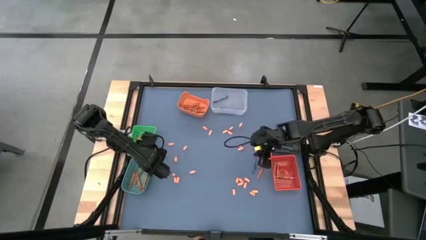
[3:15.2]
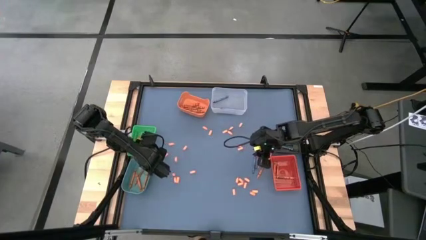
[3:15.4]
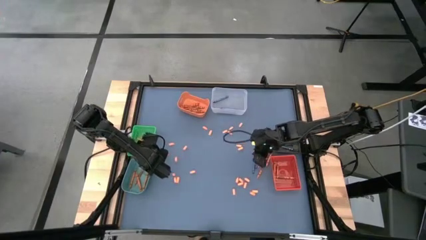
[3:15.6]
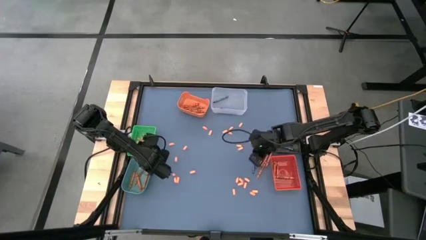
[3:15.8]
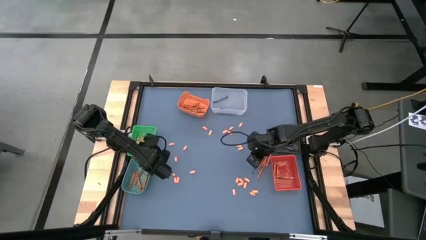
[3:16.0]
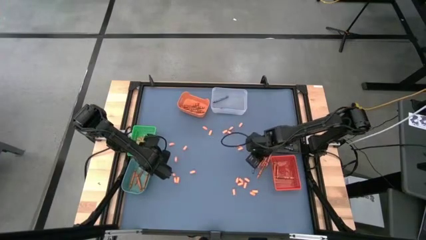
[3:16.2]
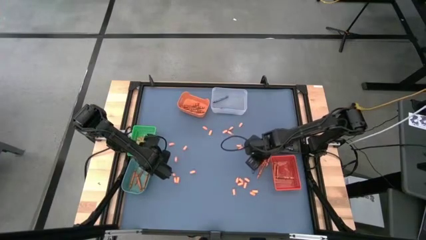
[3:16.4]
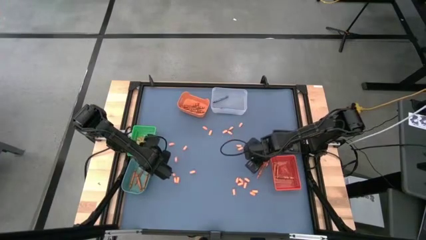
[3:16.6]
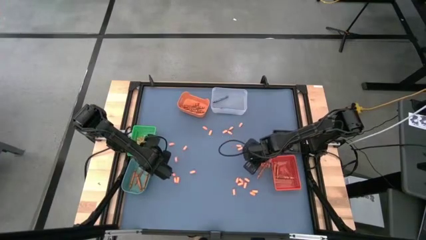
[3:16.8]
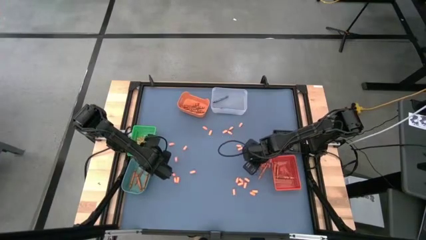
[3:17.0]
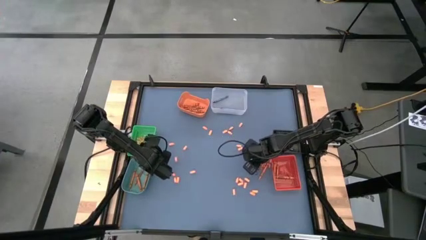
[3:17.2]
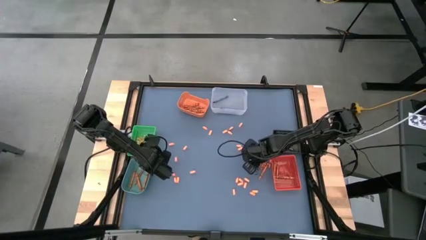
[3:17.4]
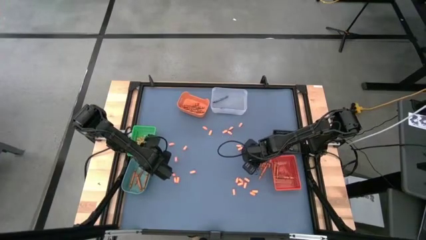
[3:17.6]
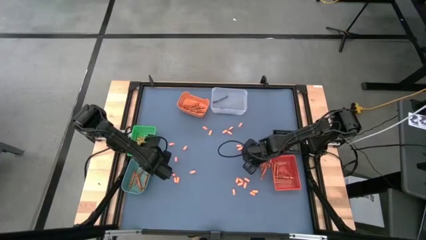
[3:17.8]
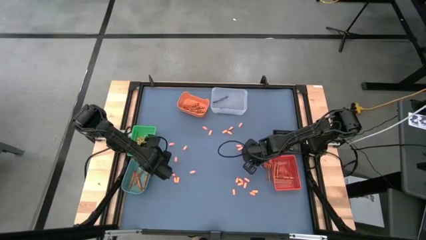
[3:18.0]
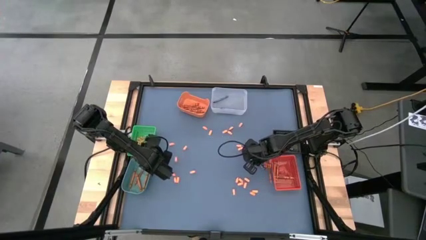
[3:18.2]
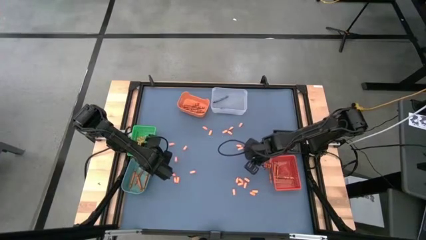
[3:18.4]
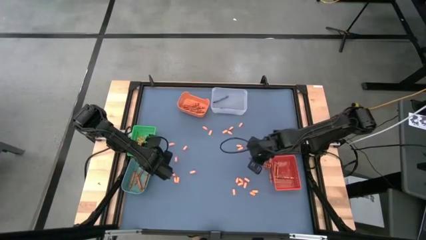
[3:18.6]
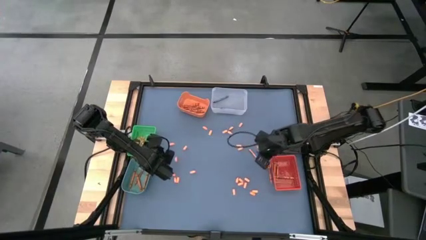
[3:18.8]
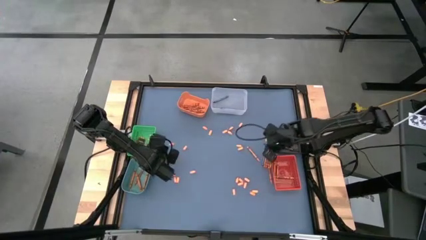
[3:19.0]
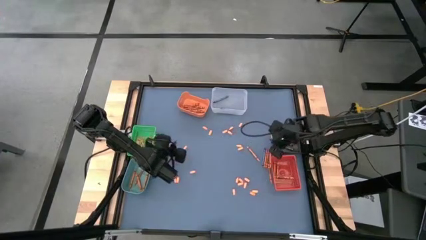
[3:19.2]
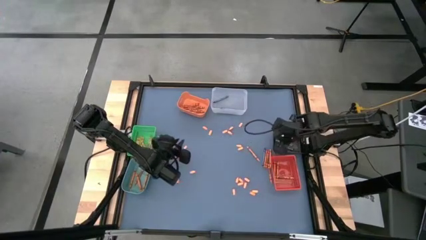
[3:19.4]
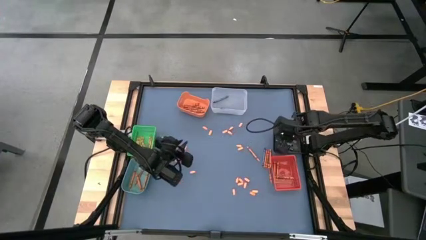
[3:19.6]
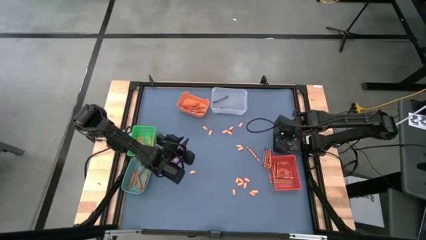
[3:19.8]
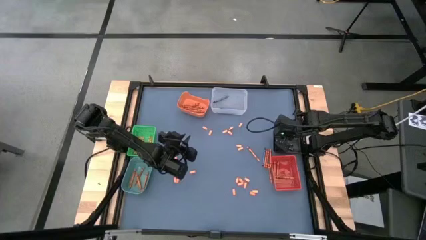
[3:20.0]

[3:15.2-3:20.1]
Task: Sort crayons
Put the blue crayon into the black bin

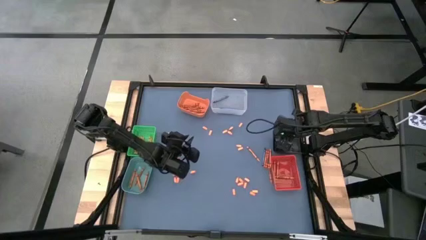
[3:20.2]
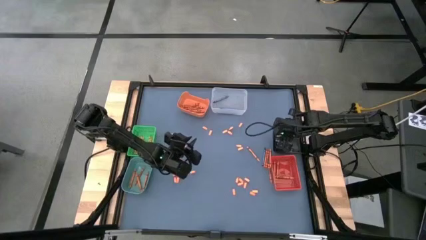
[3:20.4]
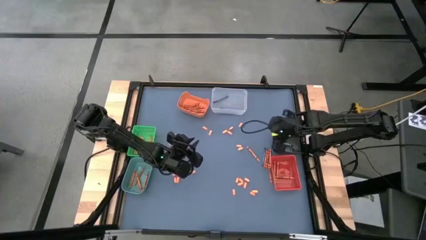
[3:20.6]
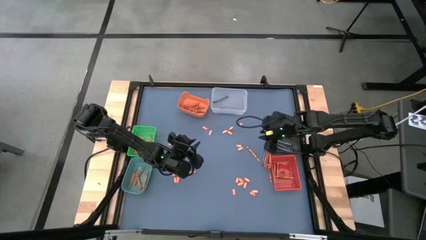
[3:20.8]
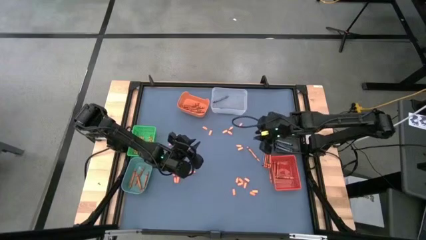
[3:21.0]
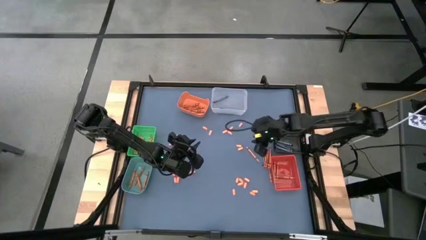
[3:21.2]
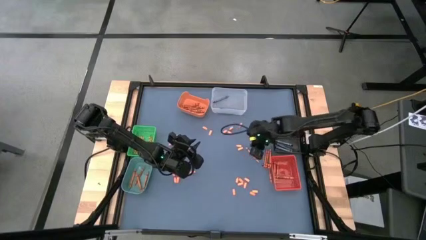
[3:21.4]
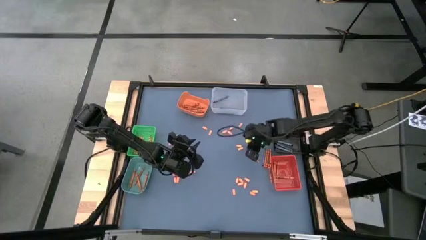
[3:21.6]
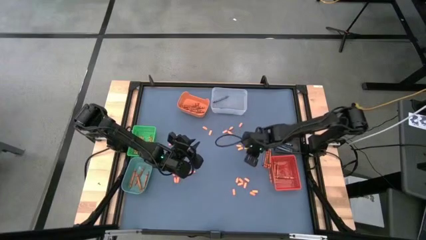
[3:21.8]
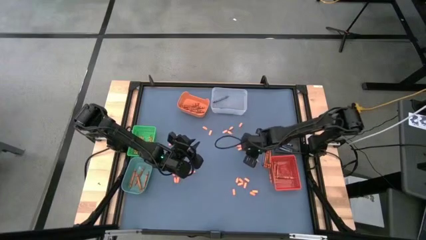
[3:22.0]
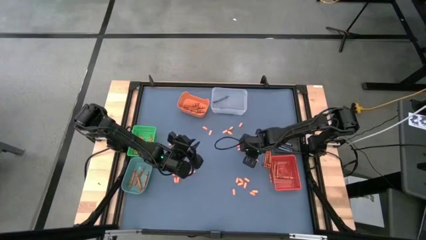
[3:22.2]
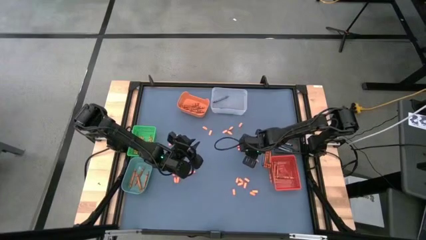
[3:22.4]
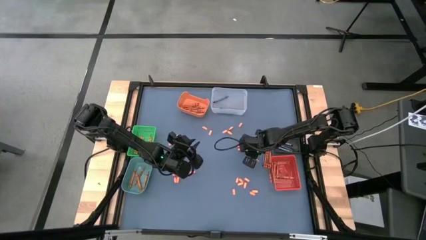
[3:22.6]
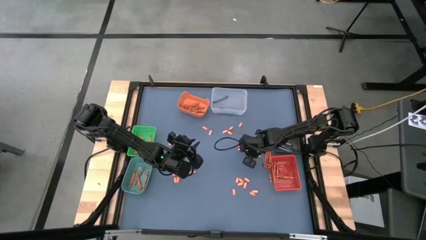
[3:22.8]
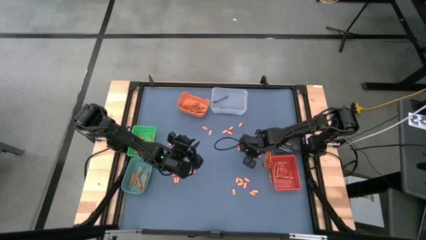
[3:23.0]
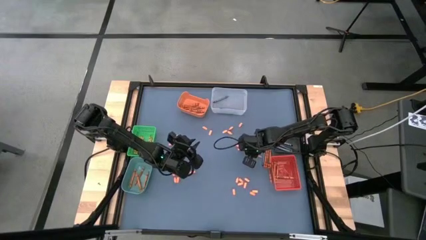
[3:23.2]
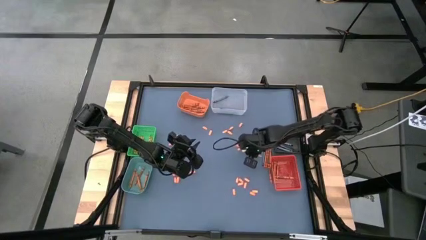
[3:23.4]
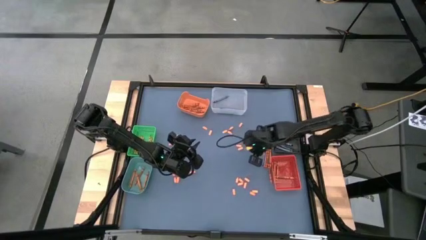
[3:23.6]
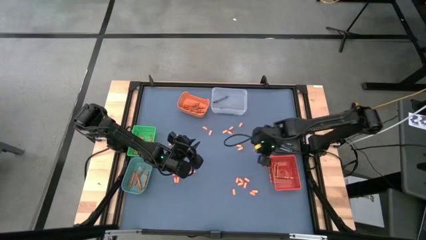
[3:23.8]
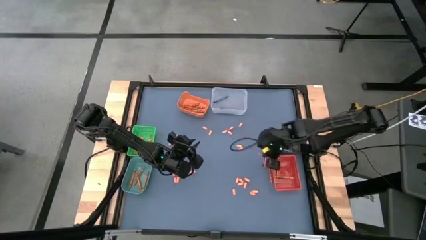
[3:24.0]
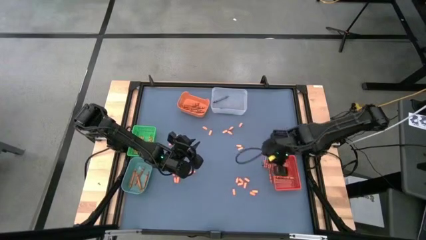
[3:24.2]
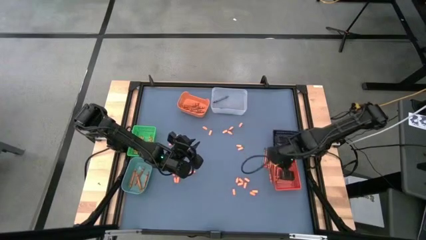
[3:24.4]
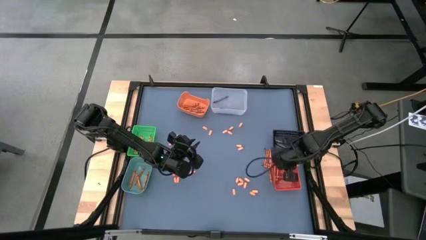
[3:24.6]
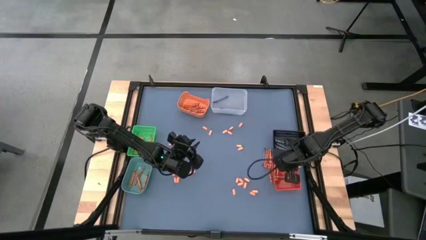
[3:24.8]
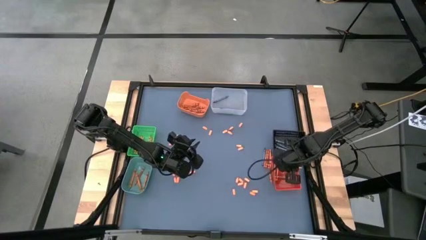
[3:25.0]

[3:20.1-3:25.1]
Put the light orange crayon into the red bin

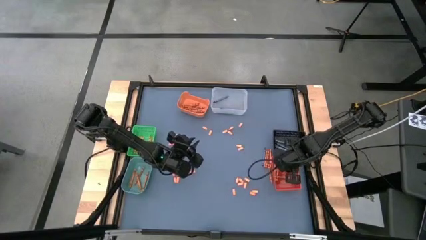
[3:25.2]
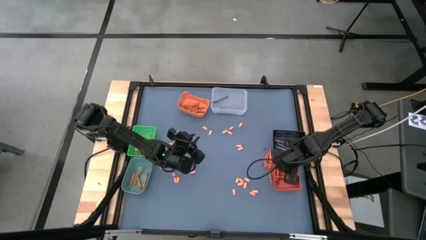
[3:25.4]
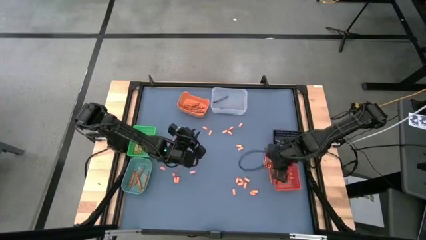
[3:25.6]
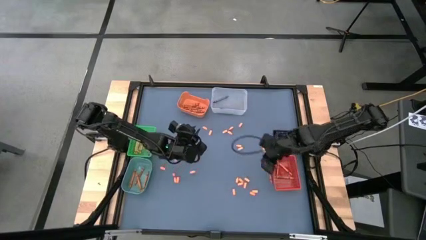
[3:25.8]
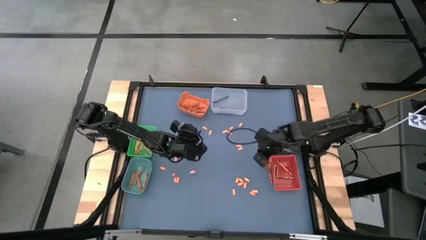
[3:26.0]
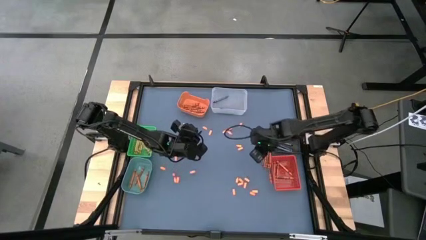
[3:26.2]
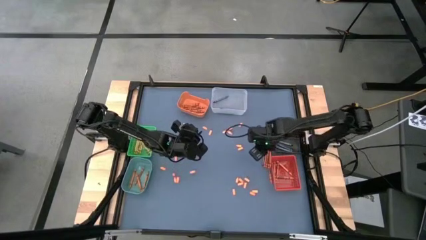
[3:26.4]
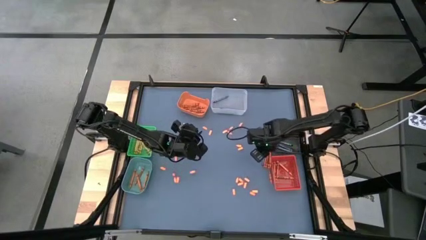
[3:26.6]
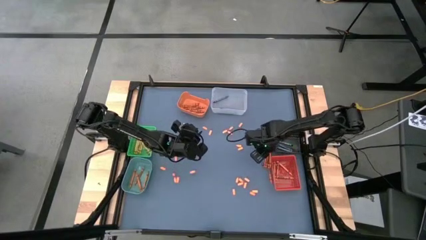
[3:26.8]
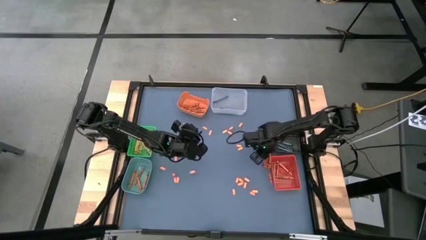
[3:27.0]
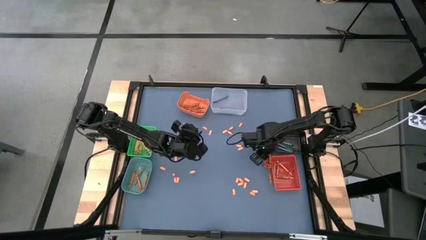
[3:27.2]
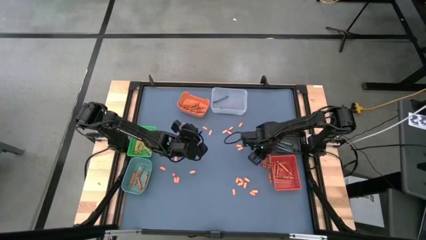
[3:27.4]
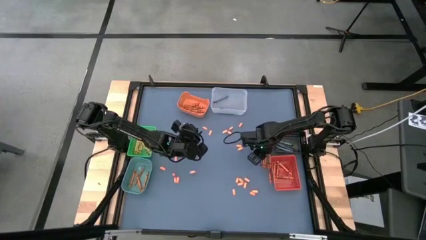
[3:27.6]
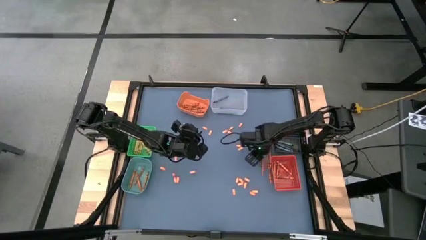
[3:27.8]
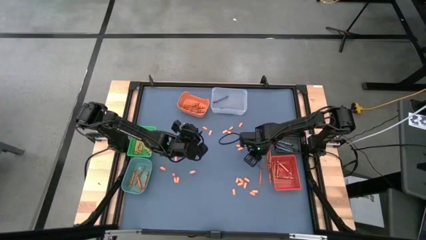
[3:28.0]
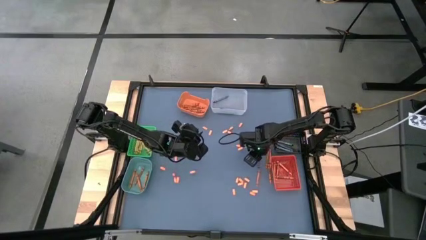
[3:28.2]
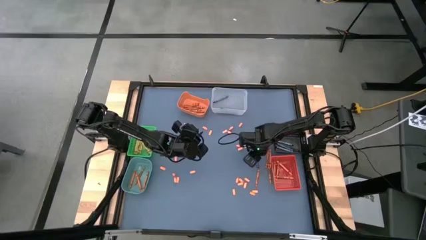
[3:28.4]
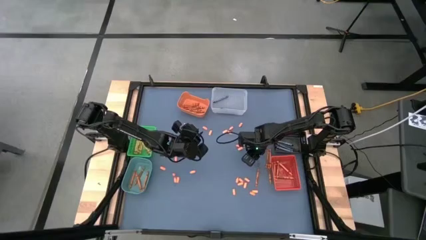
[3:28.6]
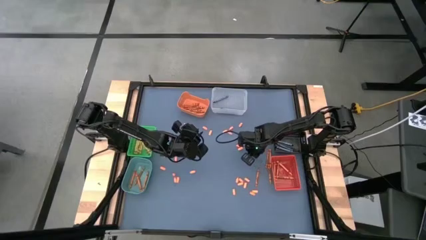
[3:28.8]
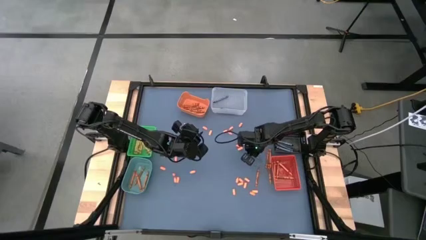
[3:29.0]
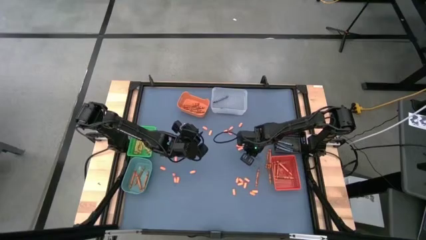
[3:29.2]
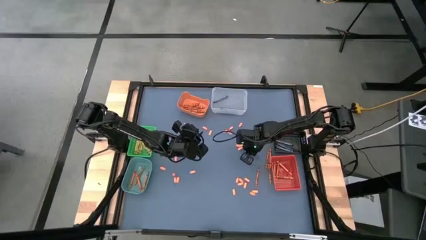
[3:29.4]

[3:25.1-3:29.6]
Put the blue crayon into the transparent bin

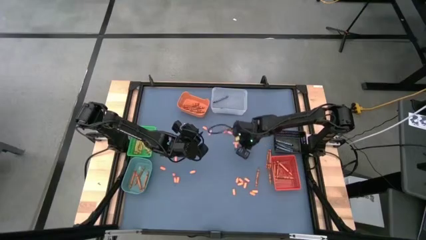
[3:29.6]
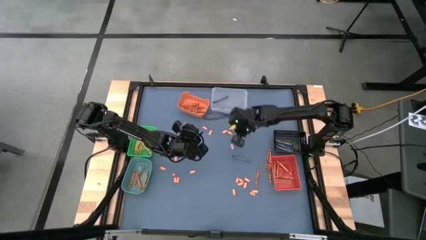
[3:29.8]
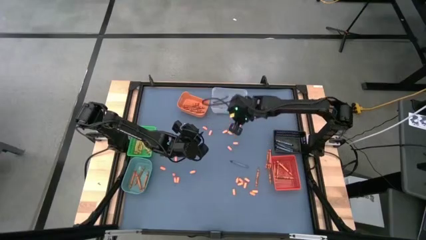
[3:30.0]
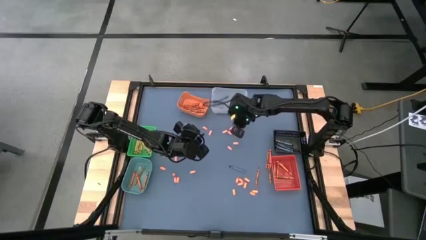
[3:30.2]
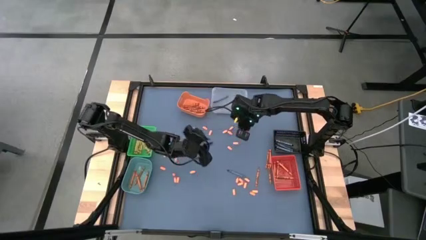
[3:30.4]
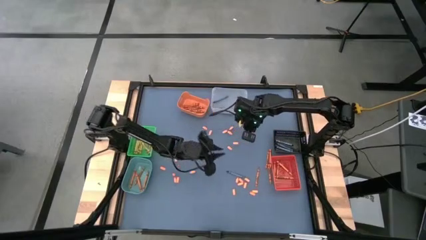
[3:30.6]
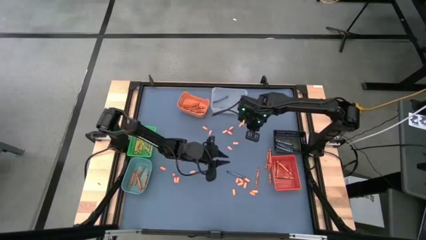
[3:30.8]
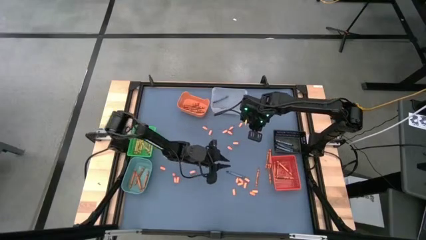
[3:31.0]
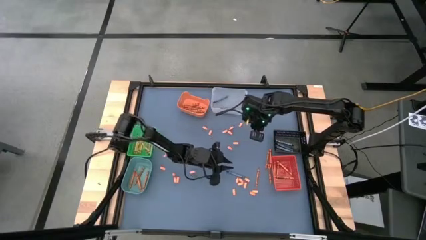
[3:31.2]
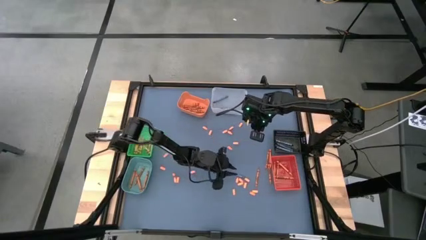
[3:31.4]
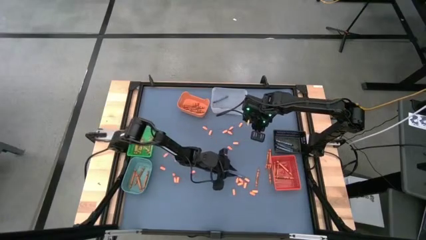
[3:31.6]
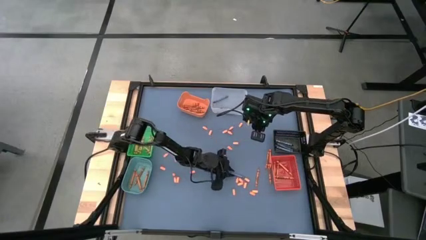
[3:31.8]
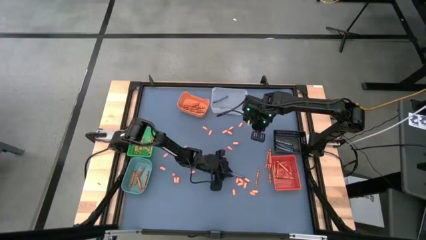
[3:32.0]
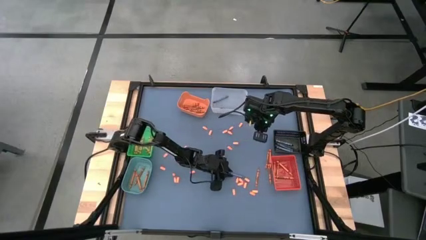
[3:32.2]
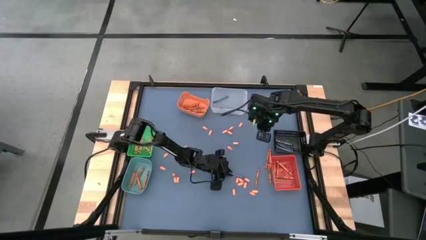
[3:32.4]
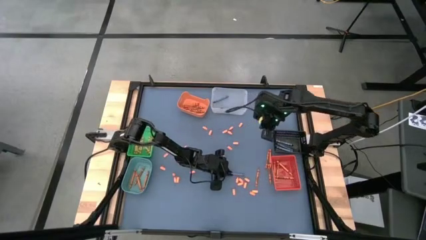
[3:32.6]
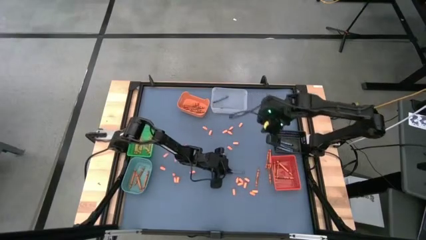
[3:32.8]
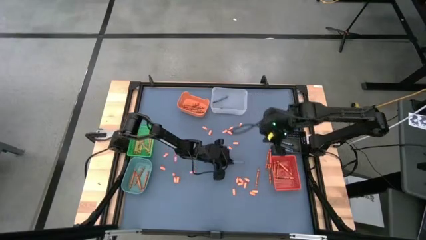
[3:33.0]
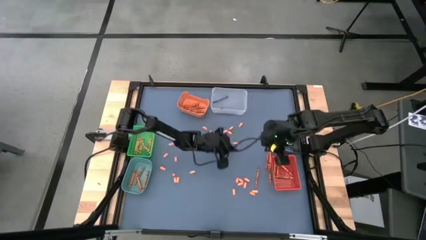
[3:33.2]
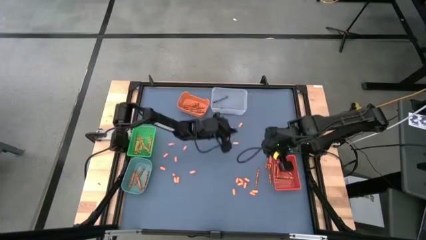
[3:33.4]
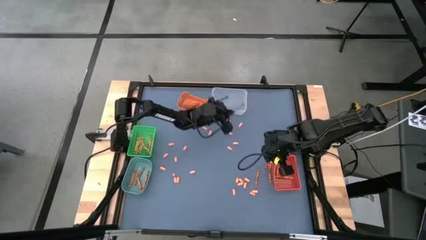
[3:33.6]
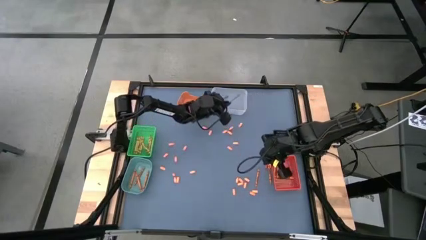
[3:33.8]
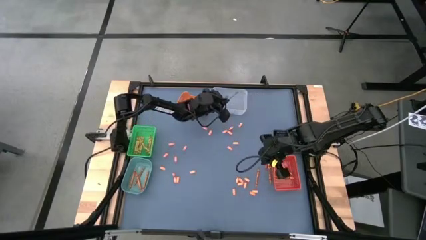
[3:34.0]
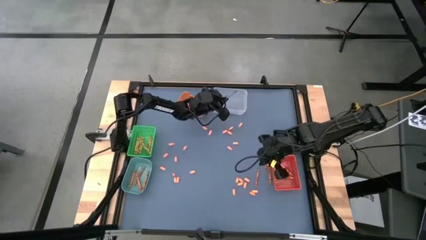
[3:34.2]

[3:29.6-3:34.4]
Put the blue crayon into the transparent bin
